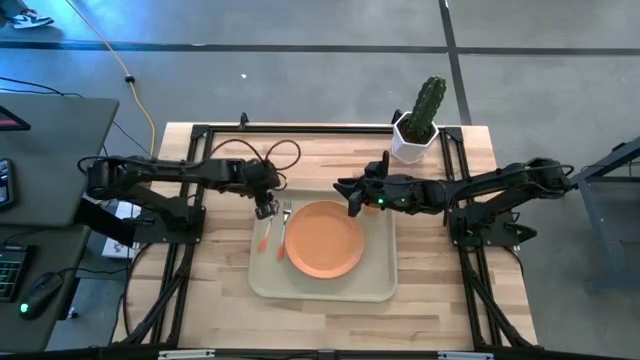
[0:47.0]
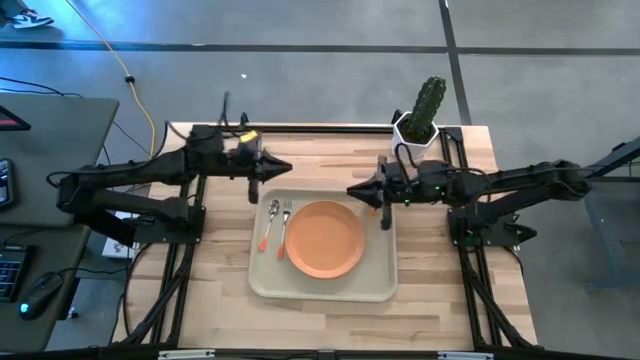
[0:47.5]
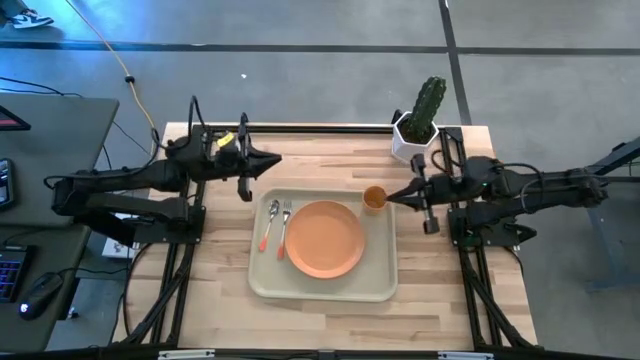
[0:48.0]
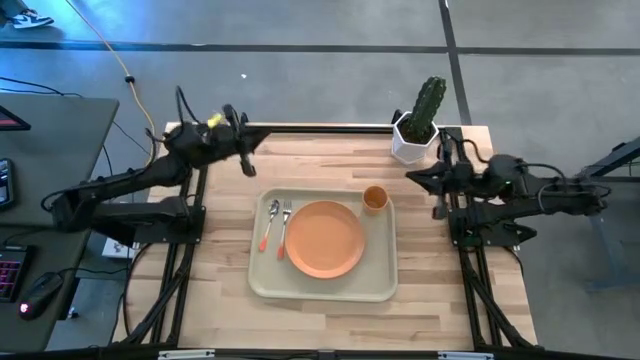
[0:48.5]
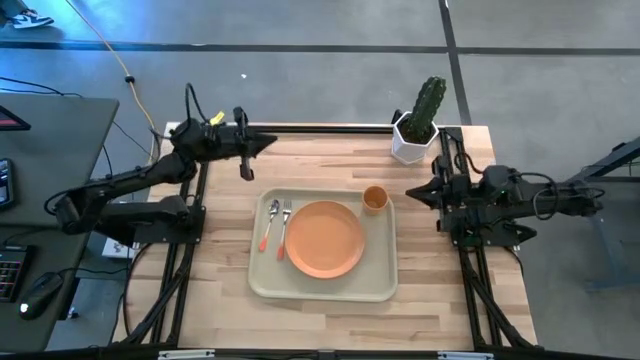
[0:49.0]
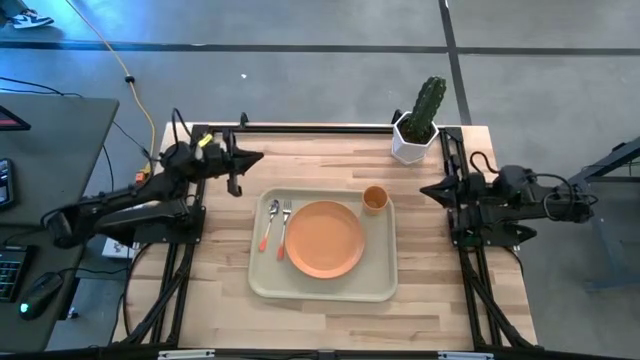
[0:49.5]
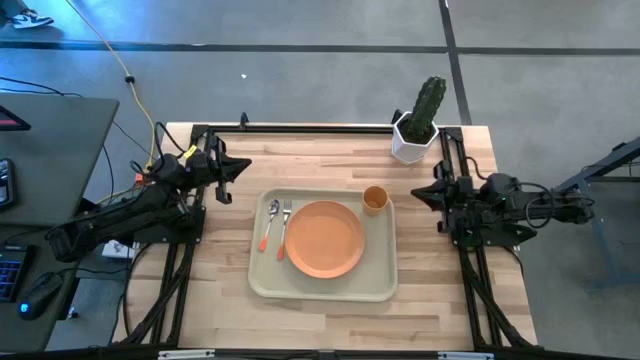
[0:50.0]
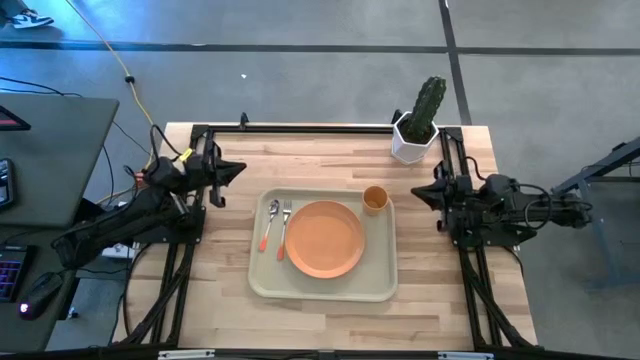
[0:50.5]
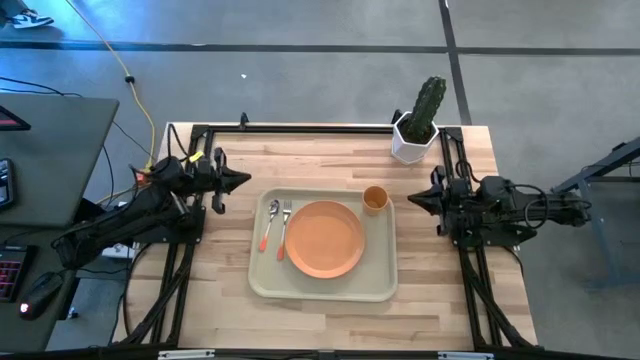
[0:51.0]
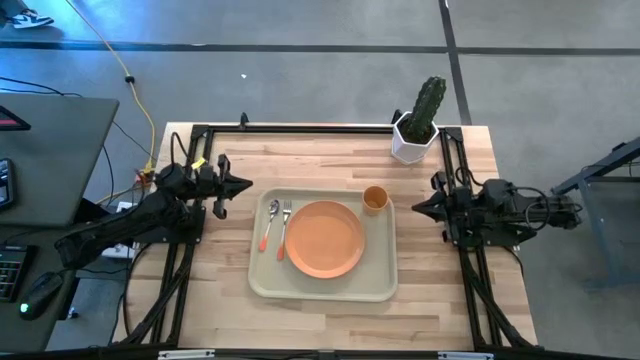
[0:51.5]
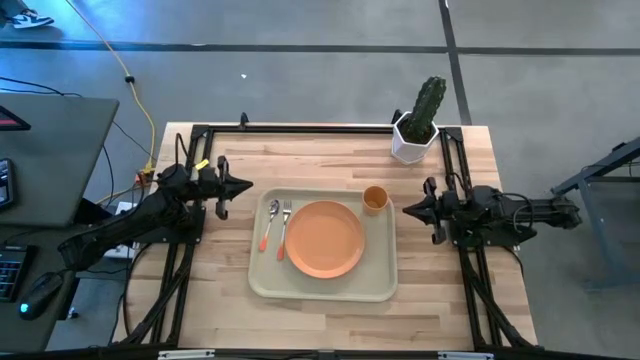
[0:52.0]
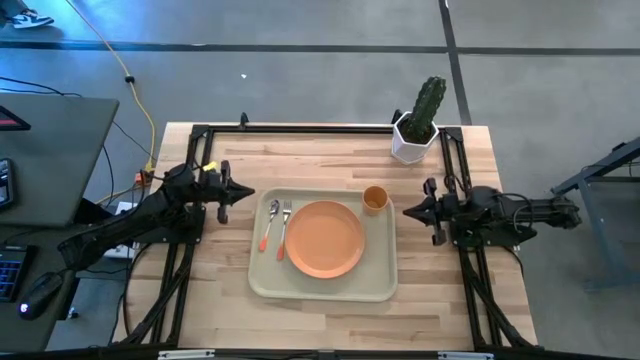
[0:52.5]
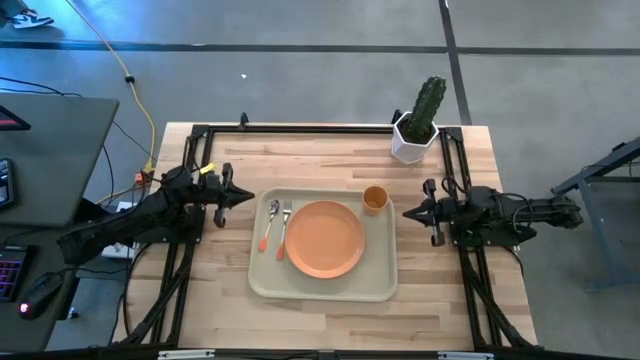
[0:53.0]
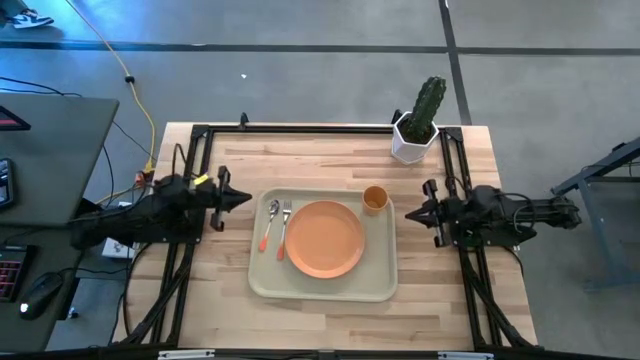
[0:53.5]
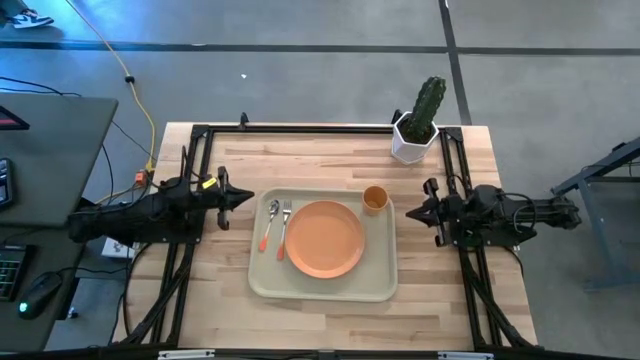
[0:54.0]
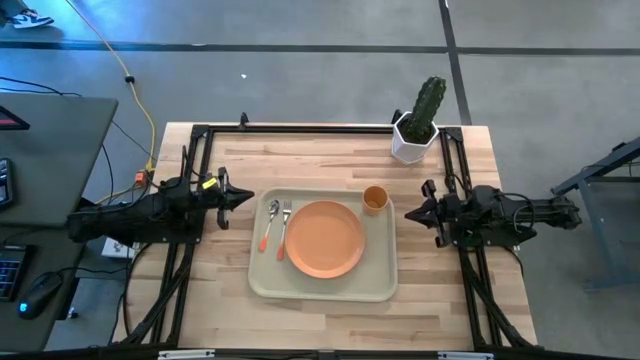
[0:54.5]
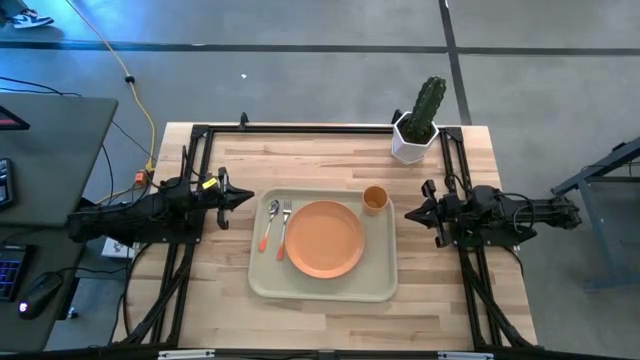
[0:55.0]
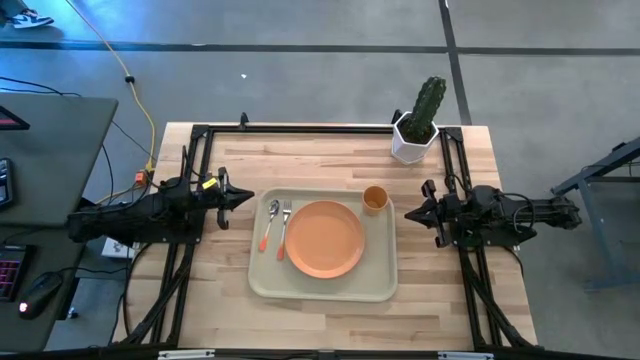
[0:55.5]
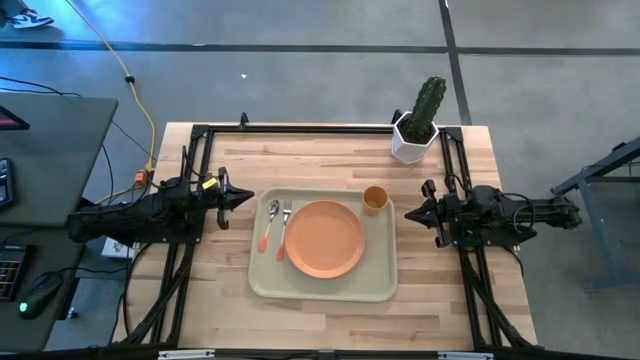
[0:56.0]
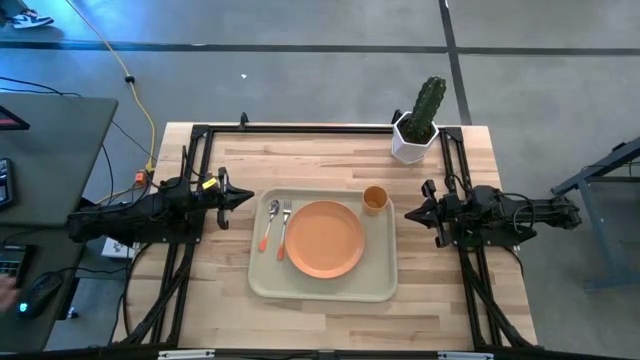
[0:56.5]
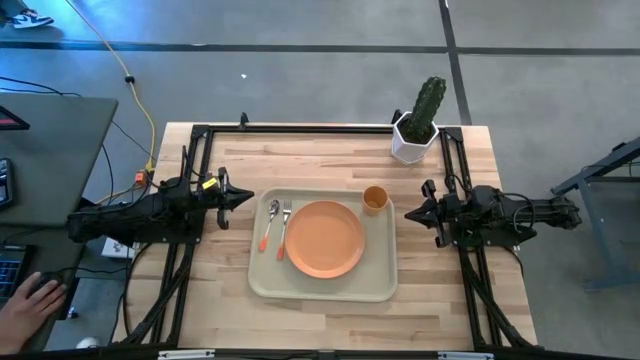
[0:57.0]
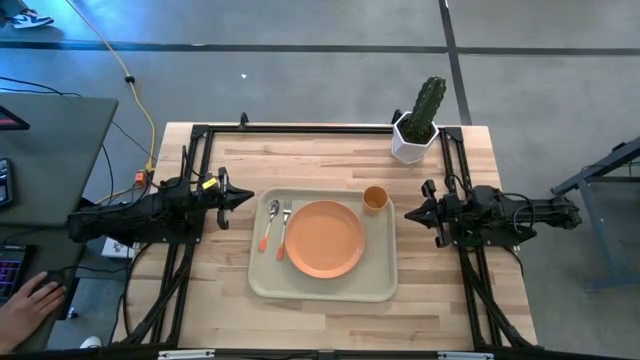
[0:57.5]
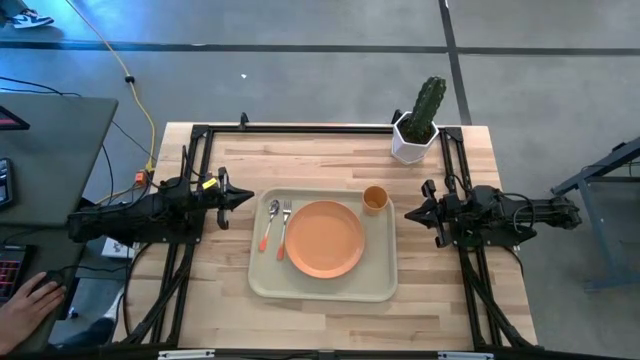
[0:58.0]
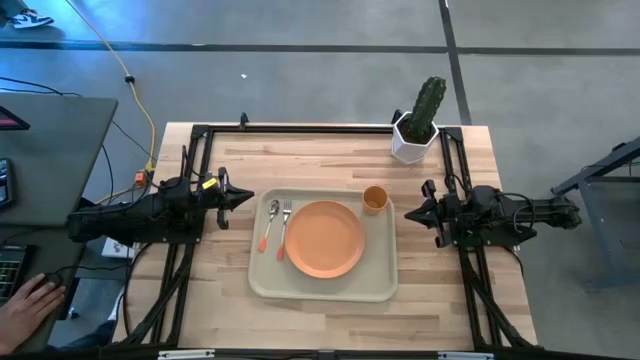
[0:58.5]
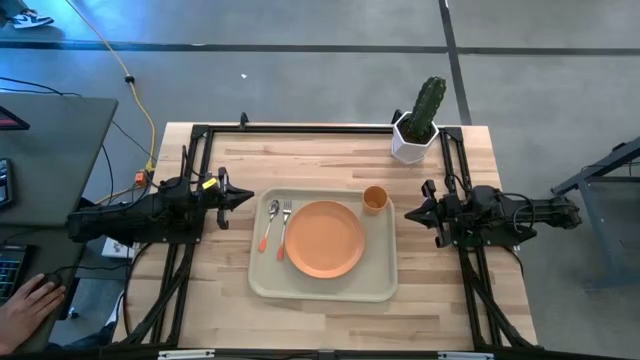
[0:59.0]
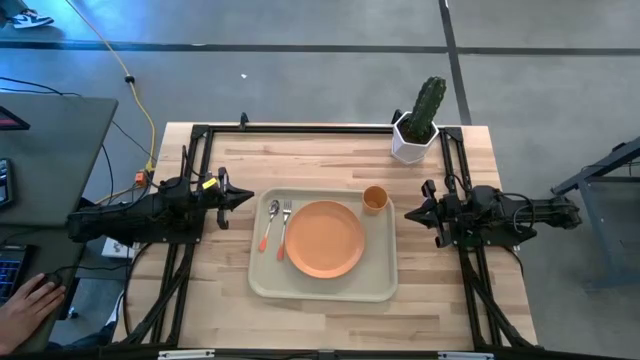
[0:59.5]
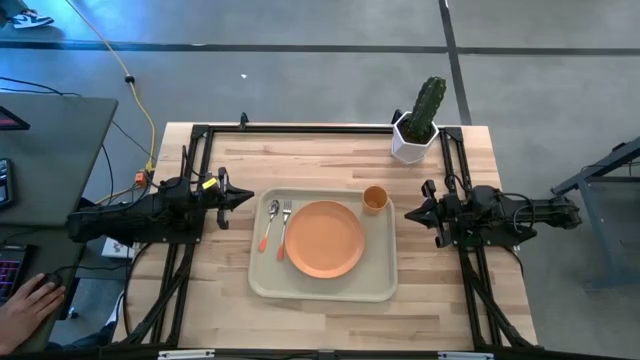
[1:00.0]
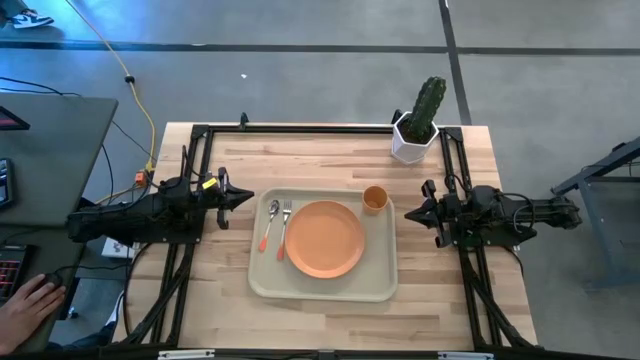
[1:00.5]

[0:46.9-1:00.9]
Task: Pick and place plate/cup/fork/spoon on tray
Return to Home Position

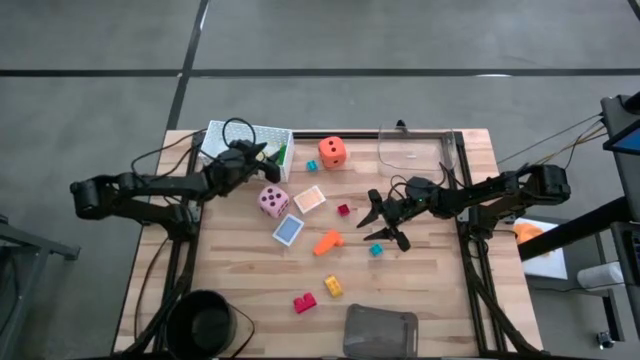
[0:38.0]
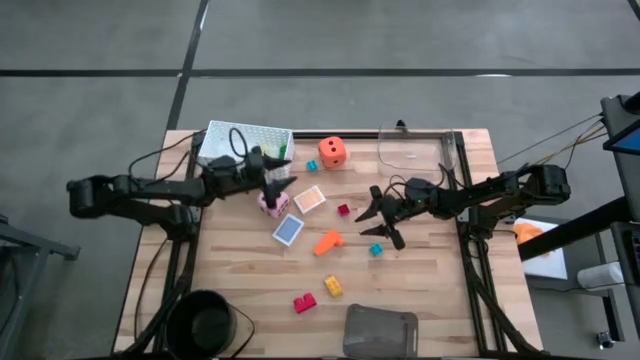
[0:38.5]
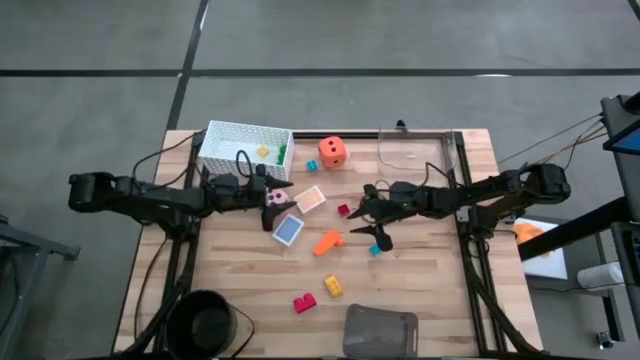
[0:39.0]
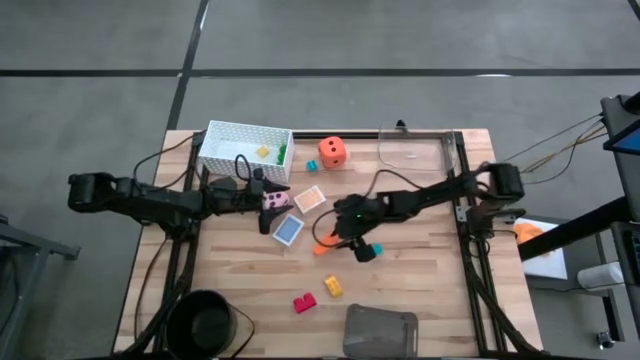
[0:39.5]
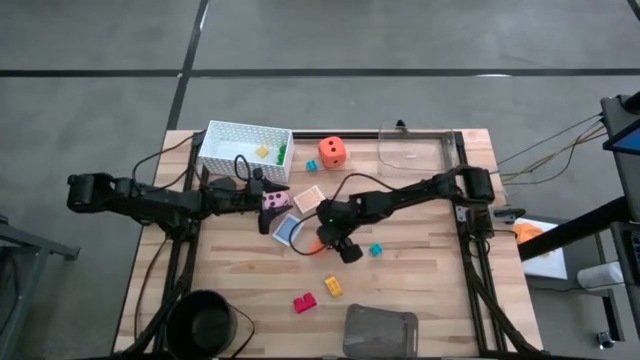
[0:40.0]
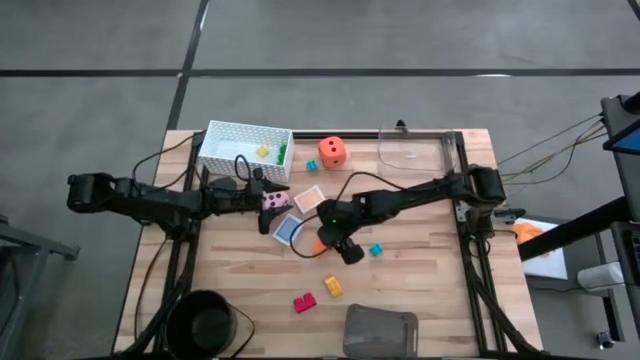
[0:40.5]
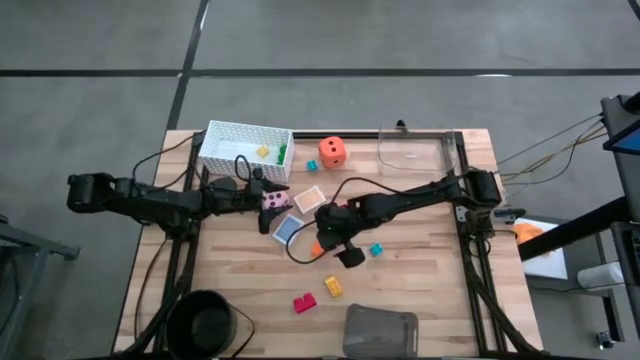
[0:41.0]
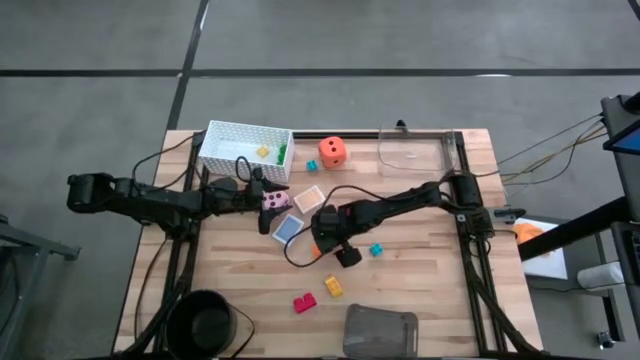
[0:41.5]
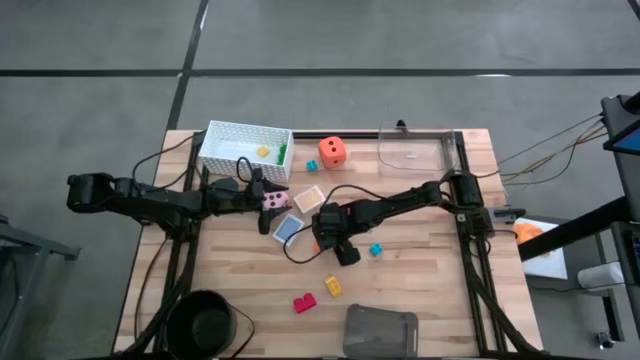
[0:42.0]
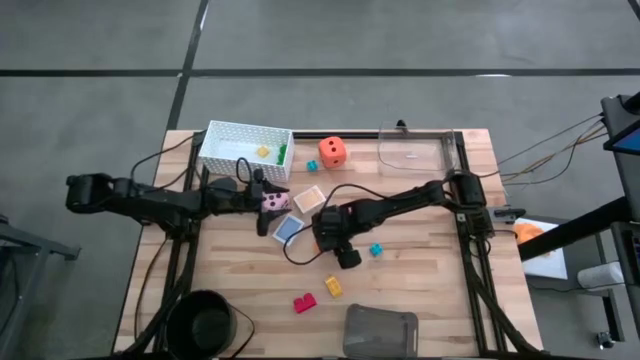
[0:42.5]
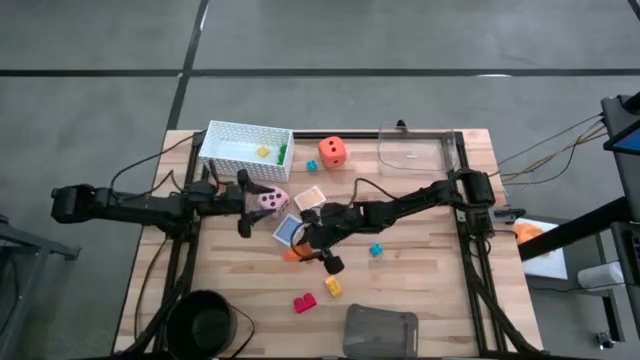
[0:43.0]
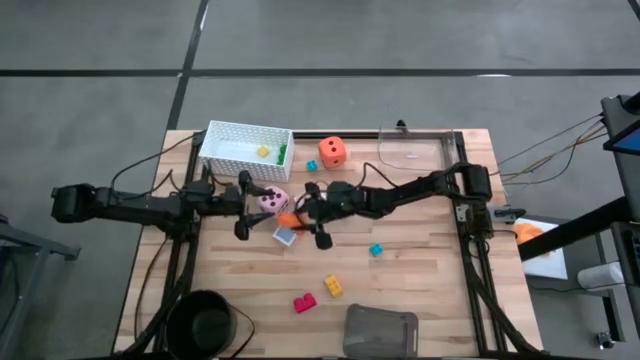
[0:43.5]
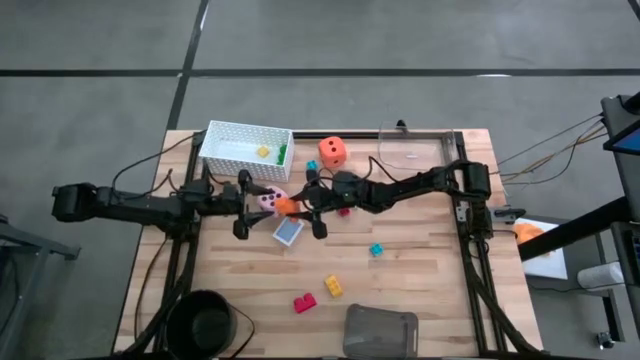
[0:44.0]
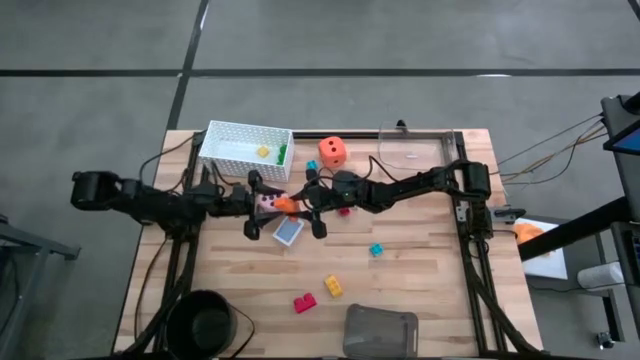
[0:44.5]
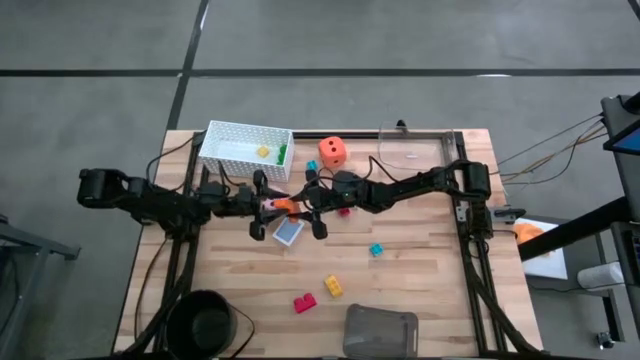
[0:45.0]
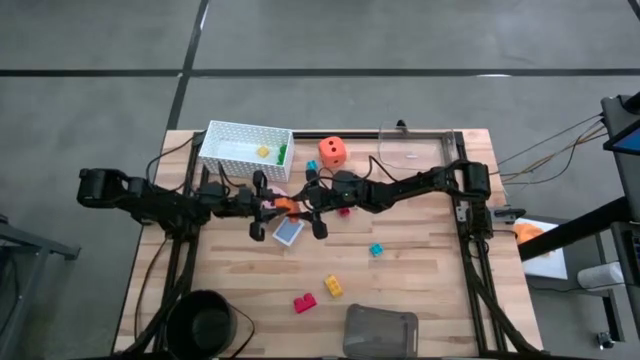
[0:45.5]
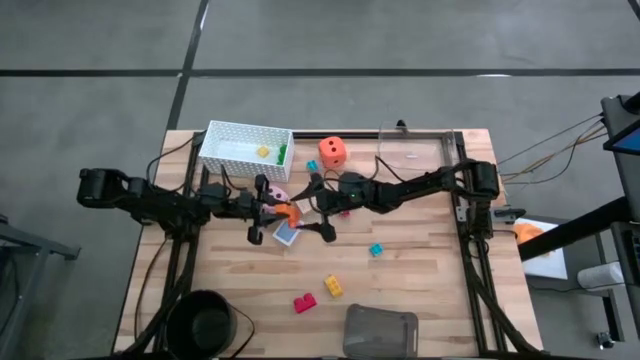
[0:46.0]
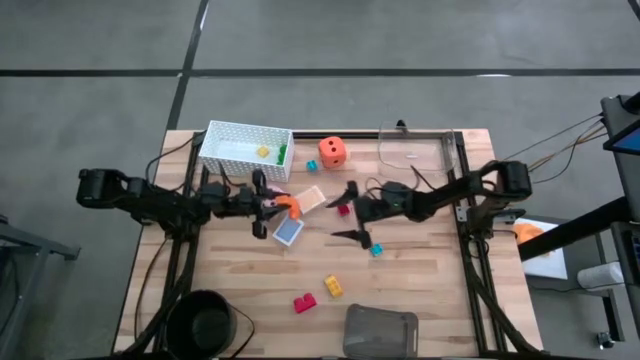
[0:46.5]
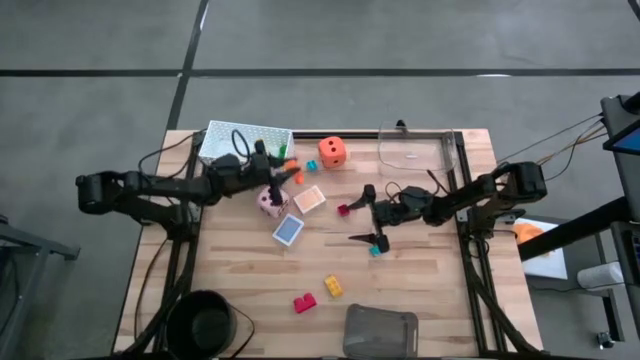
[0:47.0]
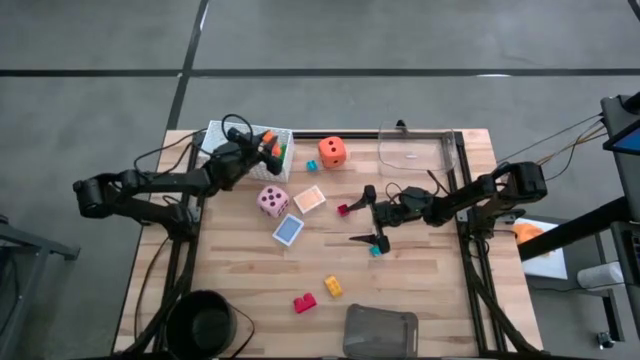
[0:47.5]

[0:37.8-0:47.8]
Task: Pick & Place Toys
Put the large orange game piece into the white bin
